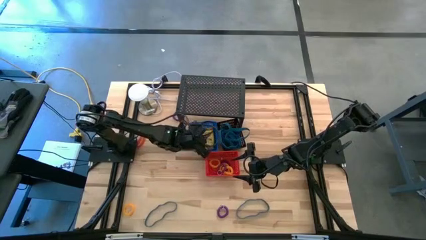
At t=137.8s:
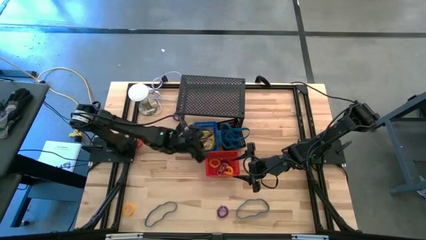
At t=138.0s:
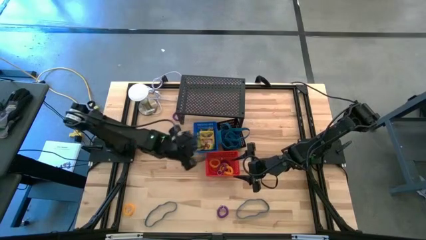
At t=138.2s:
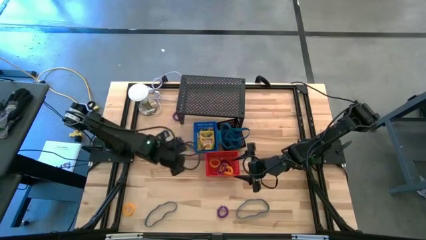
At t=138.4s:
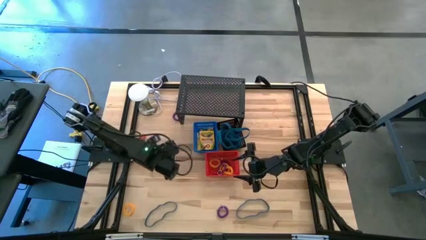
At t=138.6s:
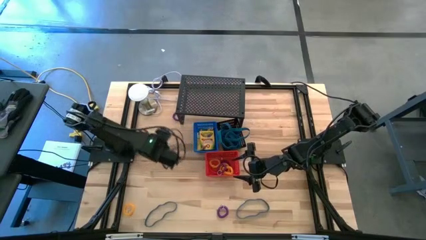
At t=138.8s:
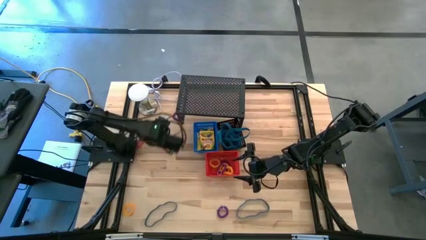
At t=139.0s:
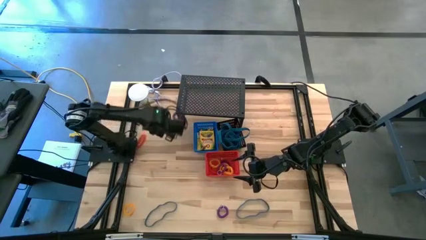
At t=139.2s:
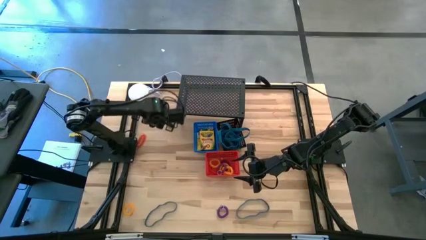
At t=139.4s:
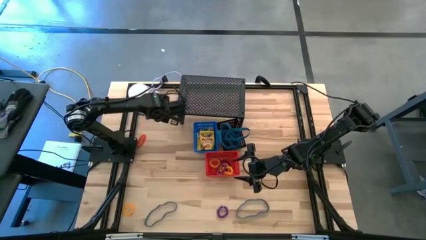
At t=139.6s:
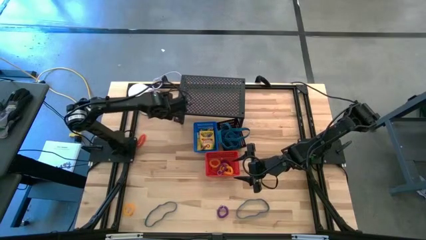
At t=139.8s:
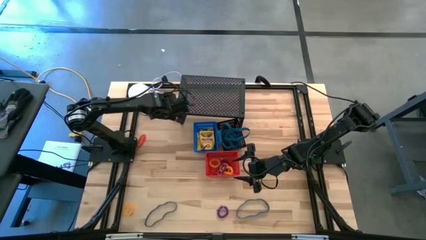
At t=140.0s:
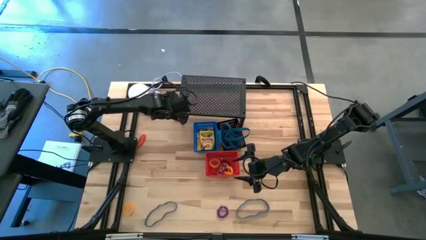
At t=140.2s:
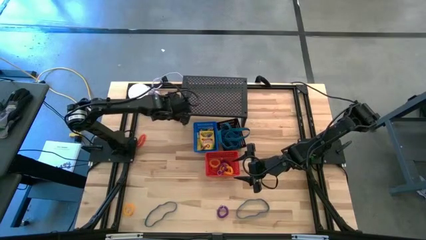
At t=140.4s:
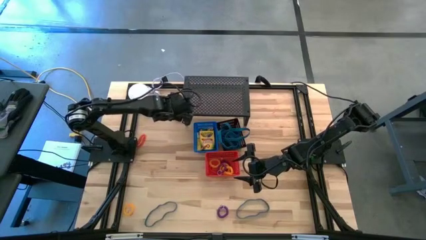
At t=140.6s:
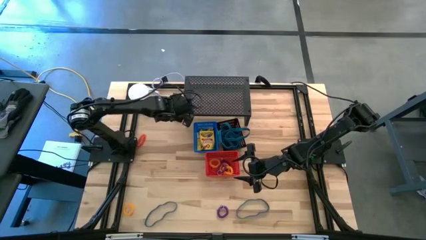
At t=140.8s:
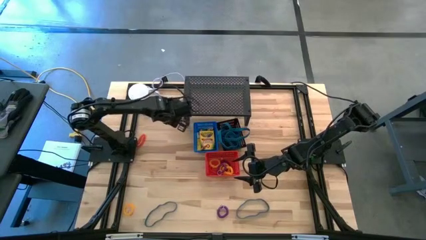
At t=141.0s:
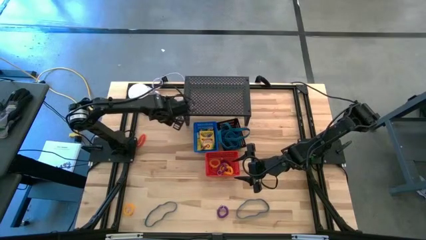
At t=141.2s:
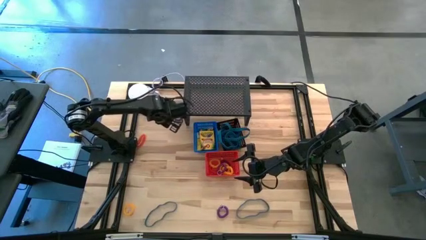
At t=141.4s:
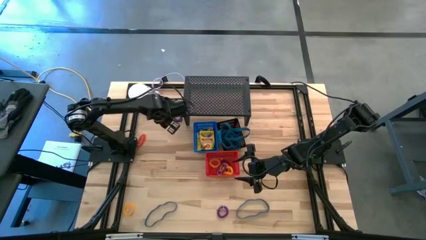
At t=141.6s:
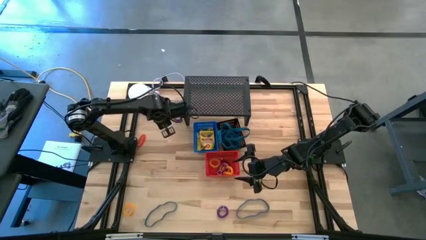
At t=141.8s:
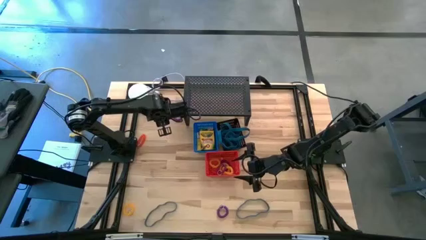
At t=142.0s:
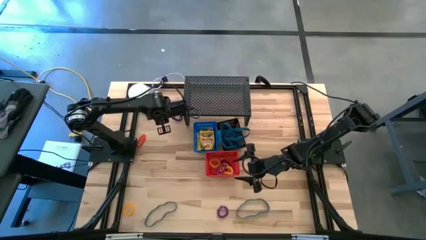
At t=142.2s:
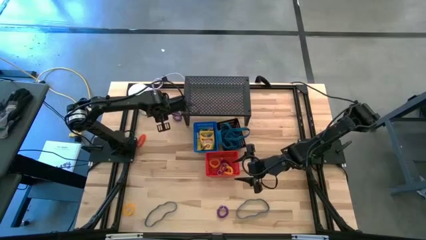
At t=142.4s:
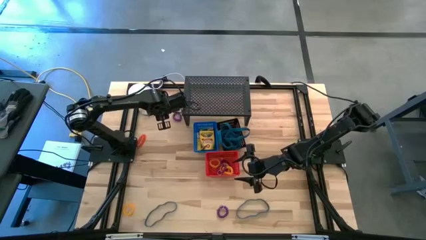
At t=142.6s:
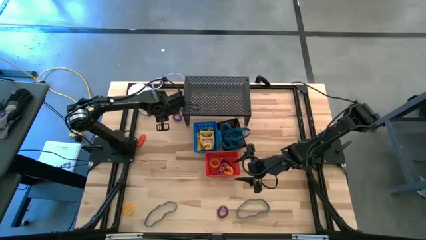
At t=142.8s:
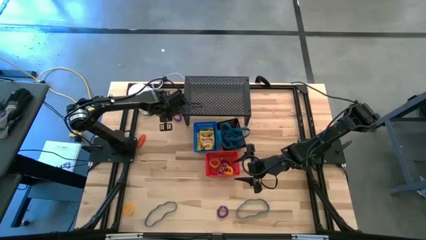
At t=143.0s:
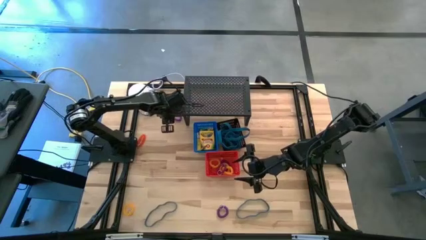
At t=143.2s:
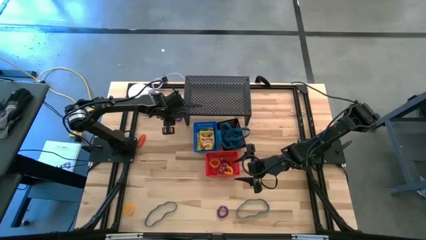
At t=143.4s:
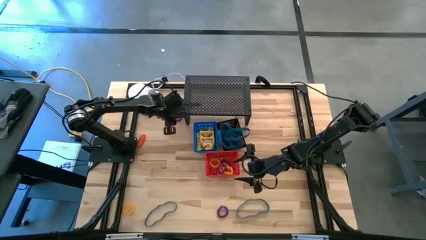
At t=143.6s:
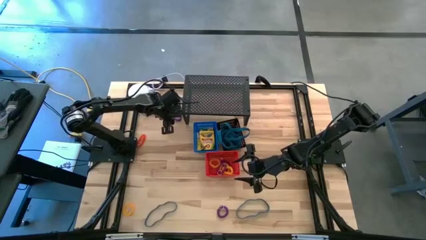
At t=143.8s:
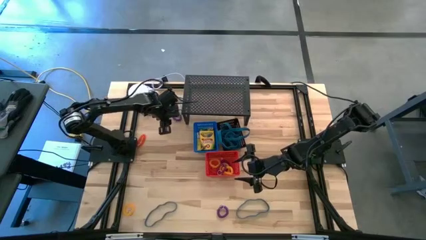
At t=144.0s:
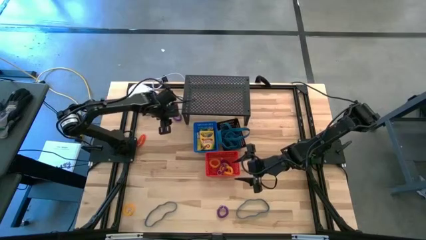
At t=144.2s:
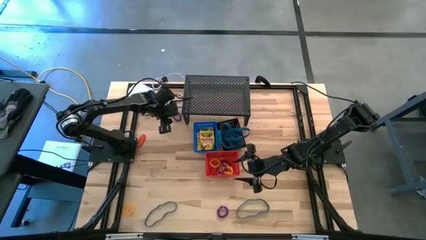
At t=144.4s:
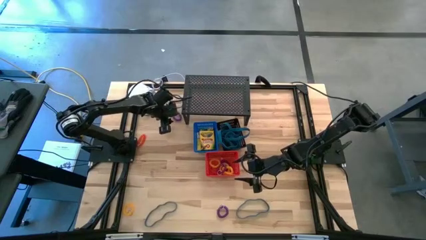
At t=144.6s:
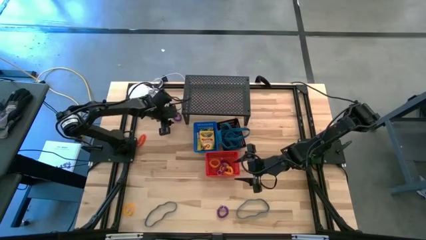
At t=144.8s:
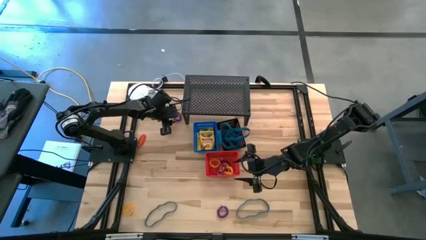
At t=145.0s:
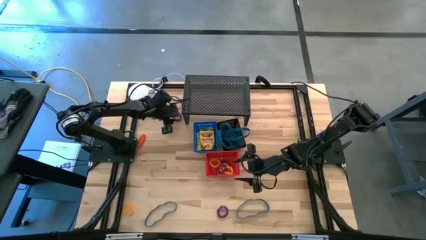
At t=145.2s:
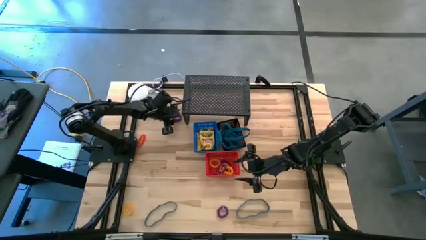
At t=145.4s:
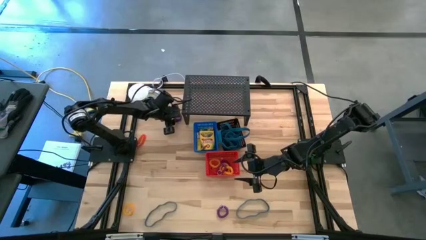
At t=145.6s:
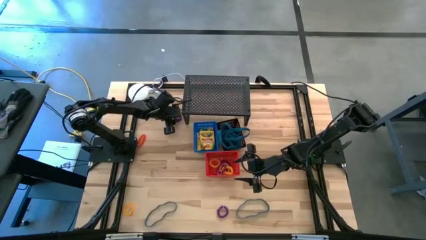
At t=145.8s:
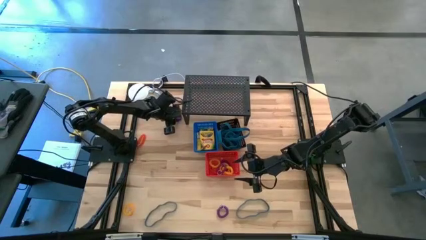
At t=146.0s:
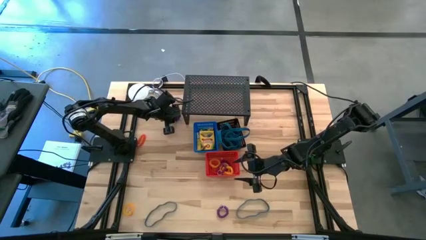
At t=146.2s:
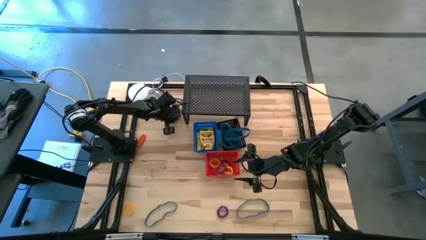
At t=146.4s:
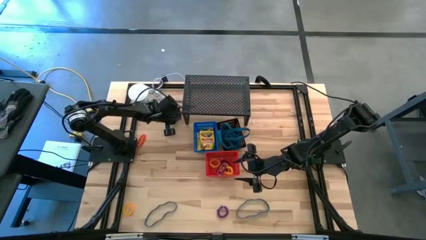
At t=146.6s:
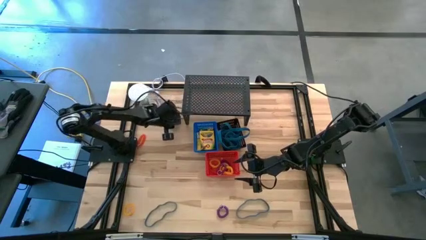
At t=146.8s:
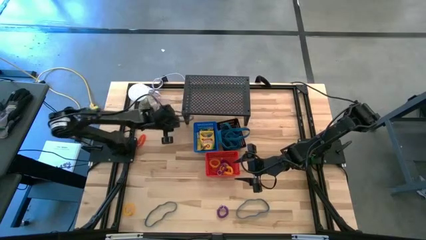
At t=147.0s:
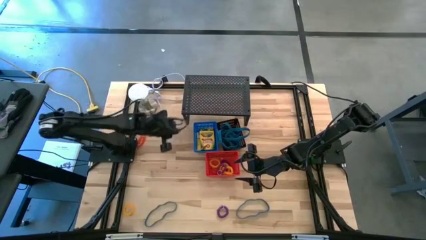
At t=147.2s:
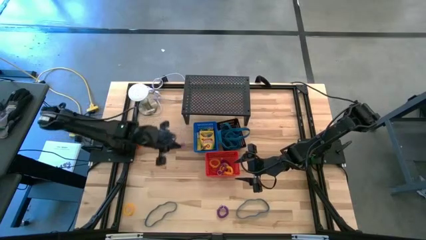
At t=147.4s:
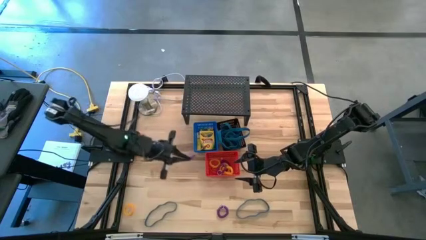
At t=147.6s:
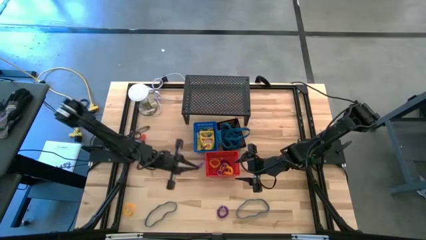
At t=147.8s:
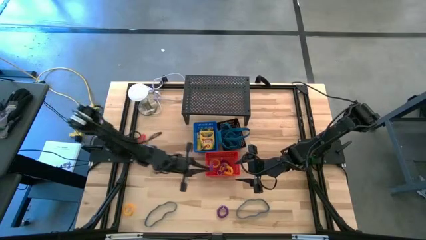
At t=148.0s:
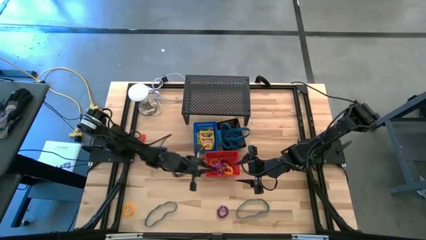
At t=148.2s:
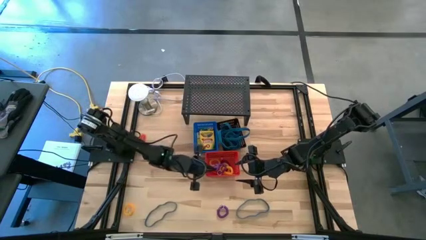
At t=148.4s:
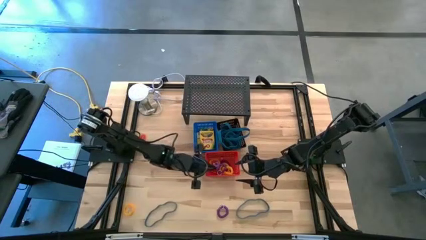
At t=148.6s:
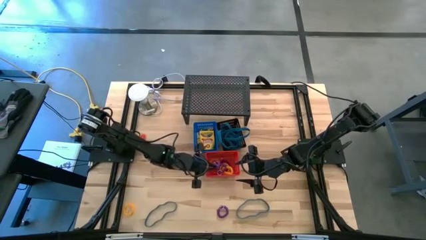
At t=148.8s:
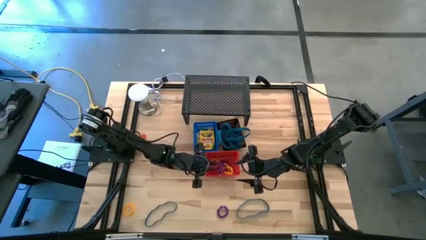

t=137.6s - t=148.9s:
Task: Pick & Place Office Desk Supplies
Put the violet spring keychain into the red bin

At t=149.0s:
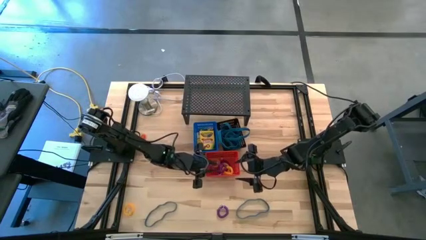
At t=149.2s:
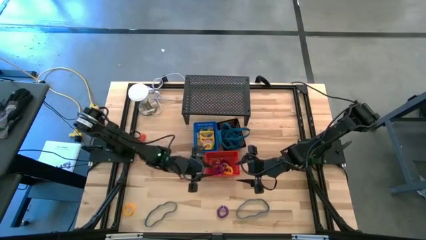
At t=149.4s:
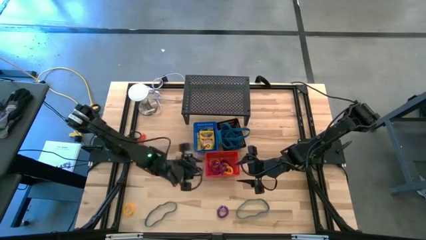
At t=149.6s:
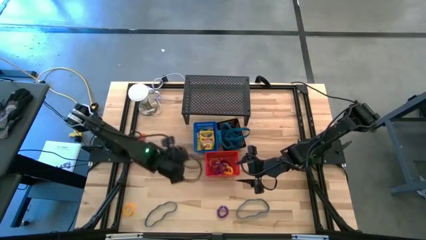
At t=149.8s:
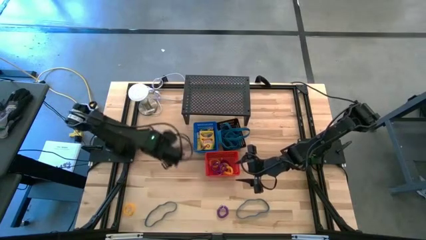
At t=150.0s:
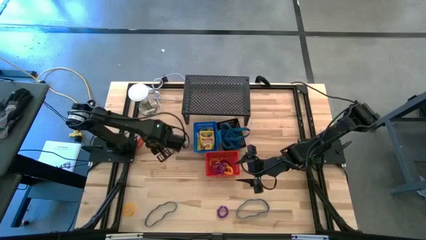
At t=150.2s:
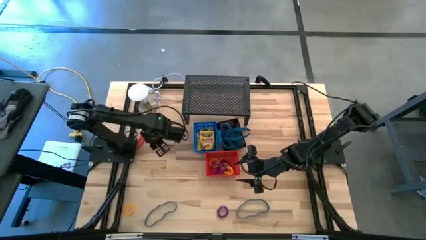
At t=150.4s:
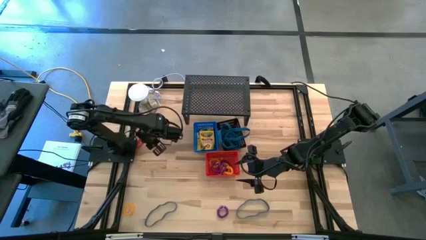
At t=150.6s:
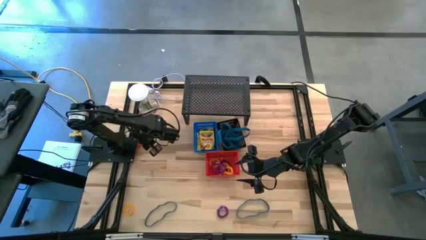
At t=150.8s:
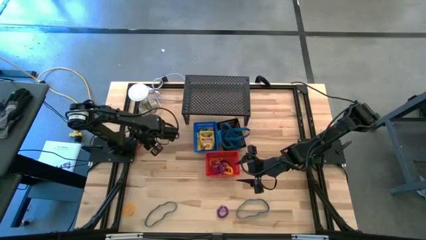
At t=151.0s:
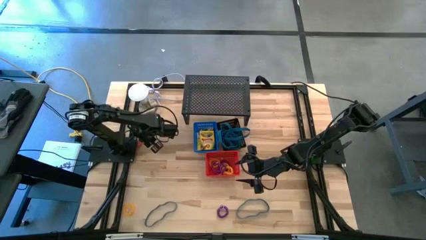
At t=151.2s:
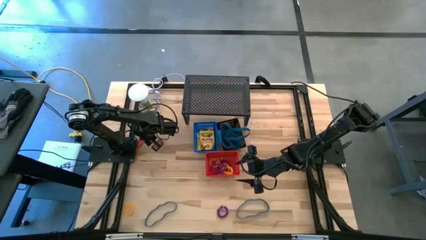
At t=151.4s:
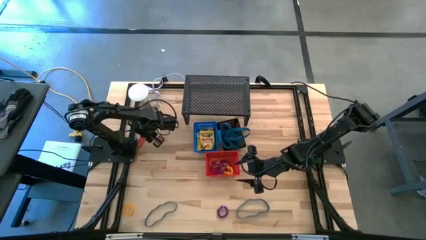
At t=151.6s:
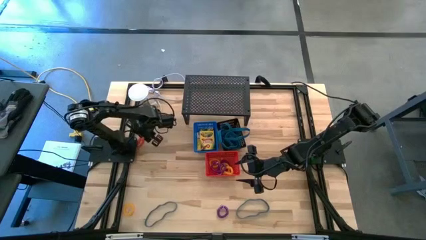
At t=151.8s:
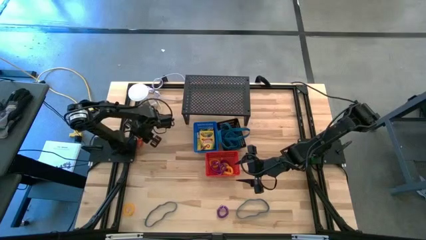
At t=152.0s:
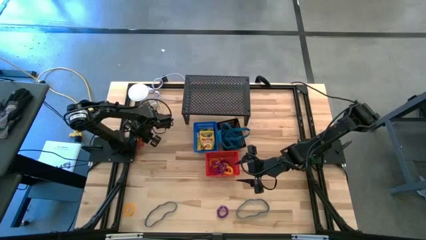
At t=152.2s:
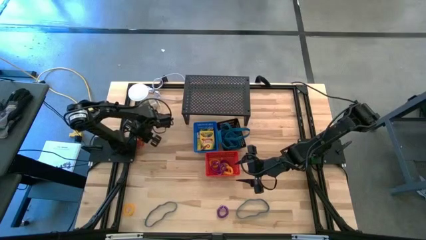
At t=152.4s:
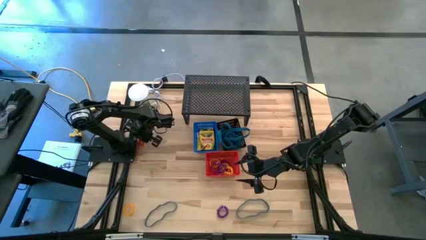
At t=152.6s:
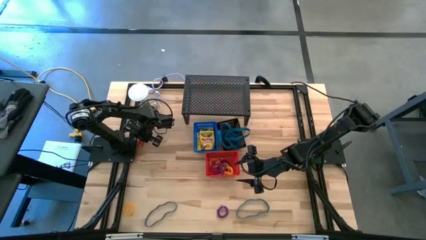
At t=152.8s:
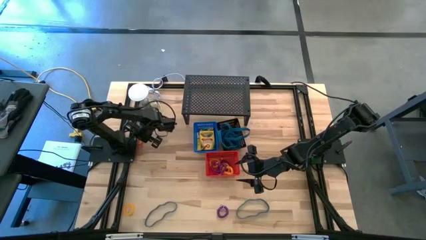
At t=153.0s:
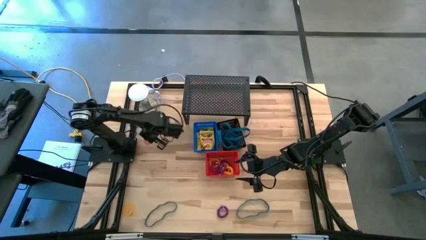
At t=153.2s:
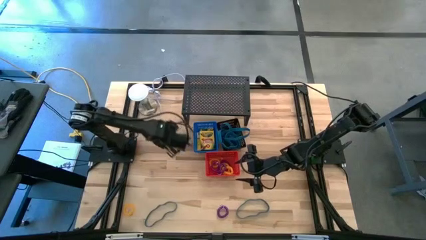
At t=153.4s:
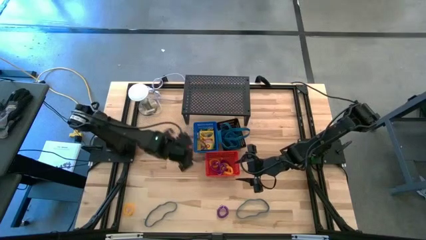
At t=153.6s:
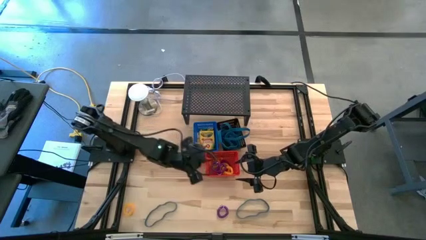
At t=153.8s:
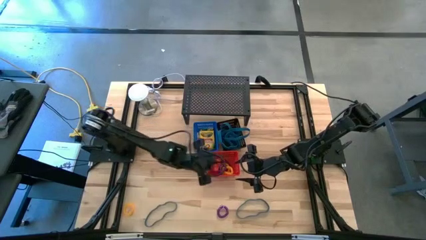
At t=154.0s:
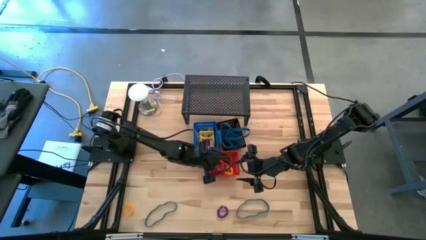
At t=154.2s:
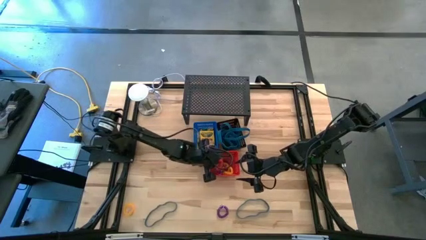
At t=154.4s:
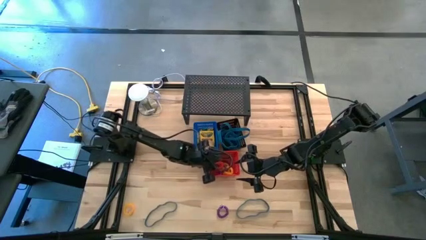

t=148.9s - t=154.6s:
Put the orange spring keychain into the red bin
